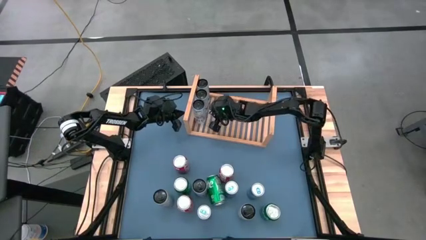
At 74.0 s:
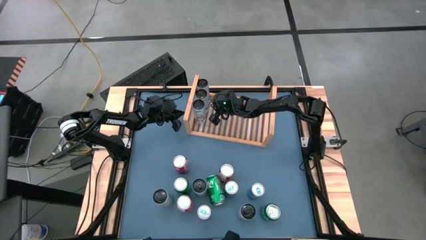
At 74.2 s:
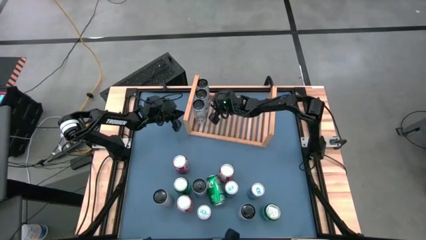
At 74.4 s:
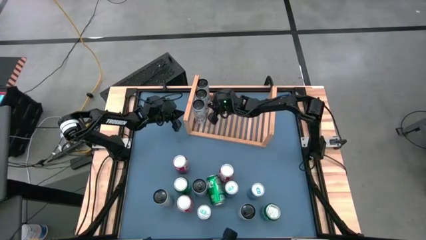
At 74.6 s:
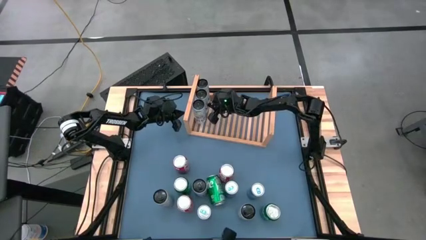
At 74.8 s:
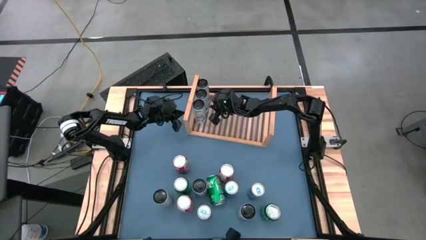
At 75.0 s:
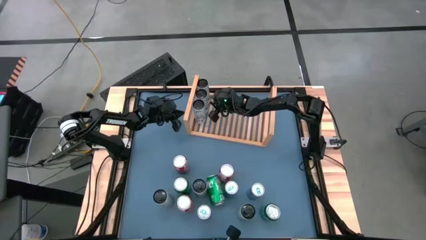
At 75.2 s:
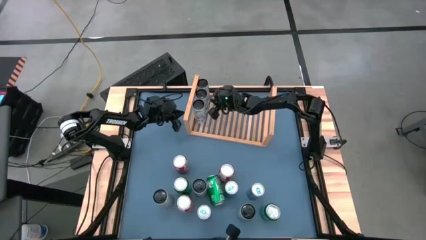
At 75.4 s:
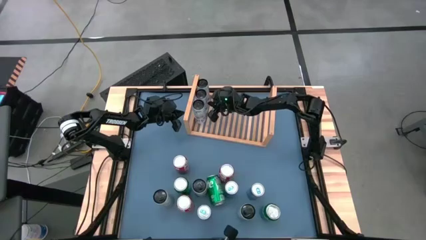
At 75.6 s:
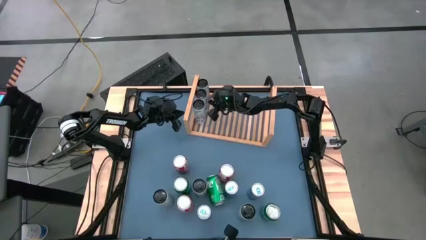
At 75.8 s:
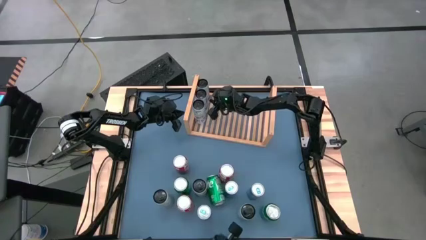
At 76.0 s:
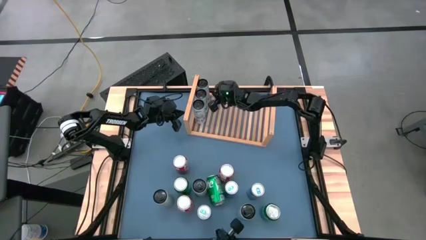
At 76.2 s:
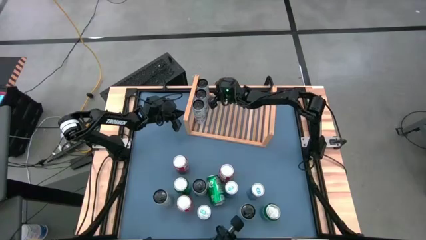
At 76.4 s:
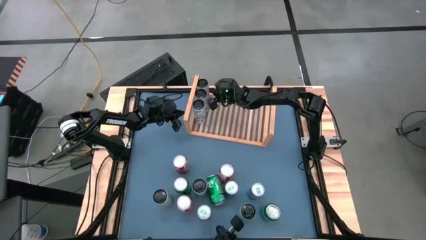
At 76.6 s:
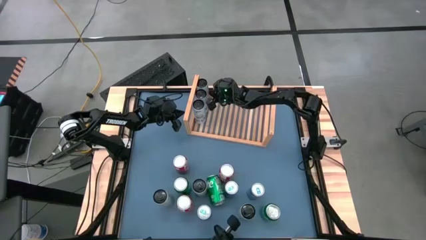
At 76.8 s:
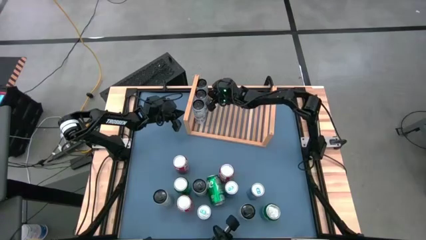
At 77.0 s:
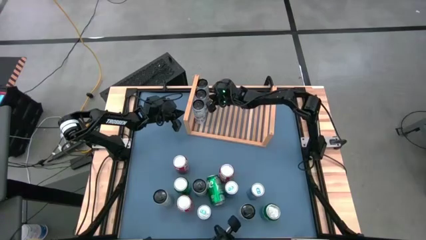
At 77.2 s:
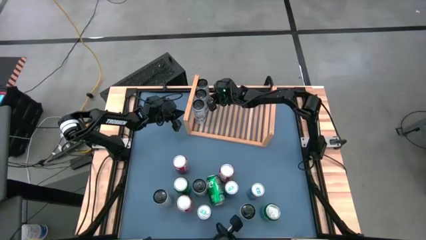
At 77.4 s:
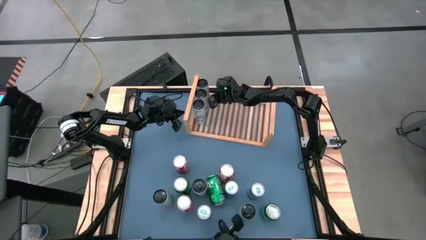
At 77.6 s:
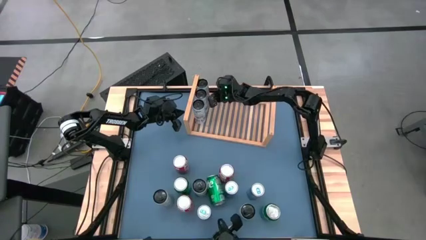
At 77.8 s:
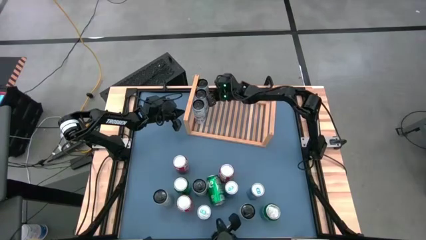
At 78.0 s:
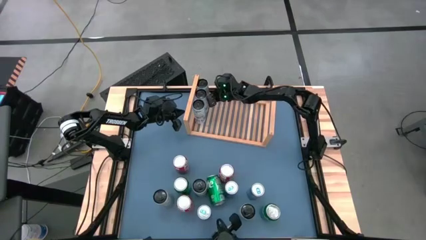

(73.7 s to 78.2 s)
Task: Place canned beverage on shelf
Adjust the white blue soda cans on the shelf

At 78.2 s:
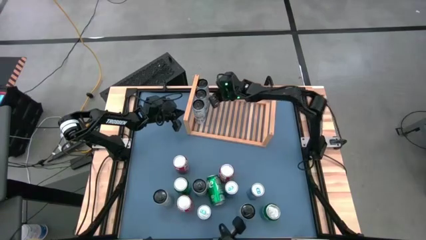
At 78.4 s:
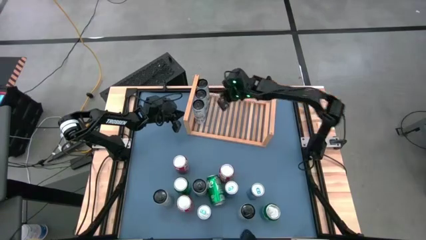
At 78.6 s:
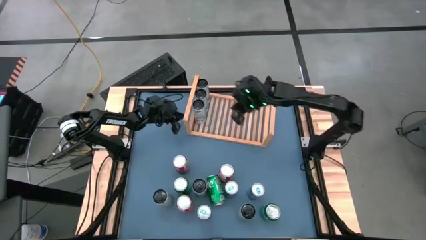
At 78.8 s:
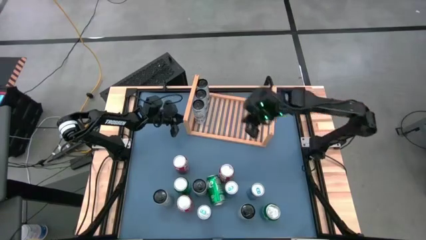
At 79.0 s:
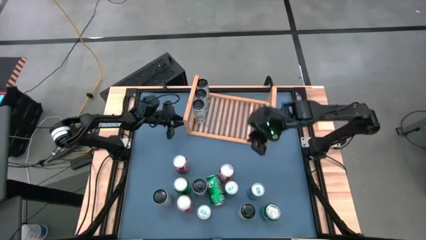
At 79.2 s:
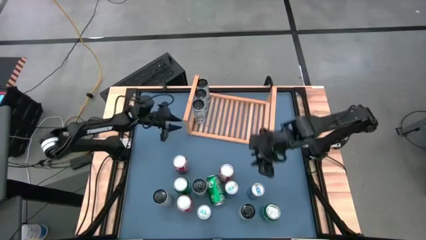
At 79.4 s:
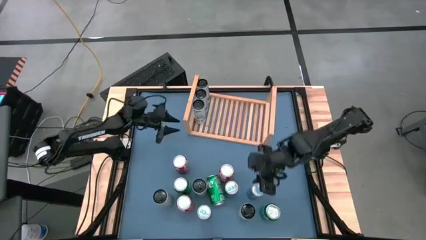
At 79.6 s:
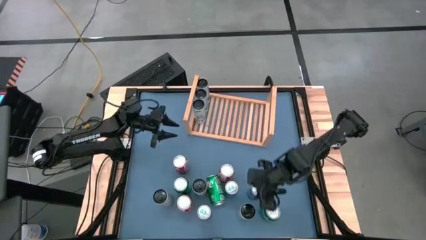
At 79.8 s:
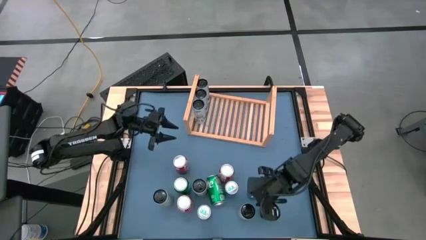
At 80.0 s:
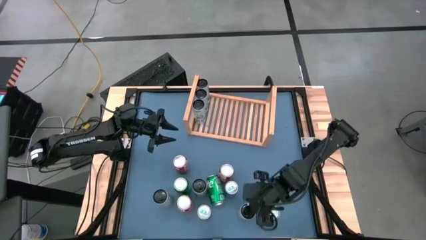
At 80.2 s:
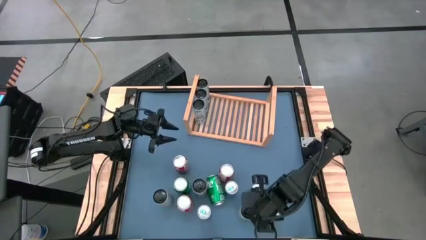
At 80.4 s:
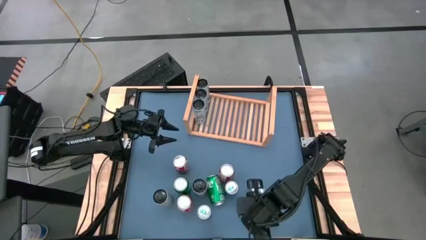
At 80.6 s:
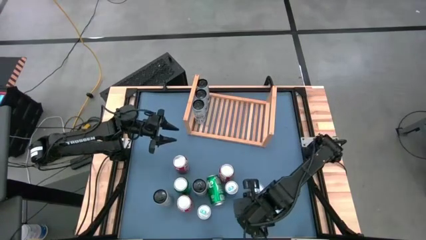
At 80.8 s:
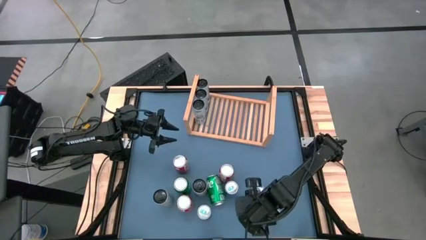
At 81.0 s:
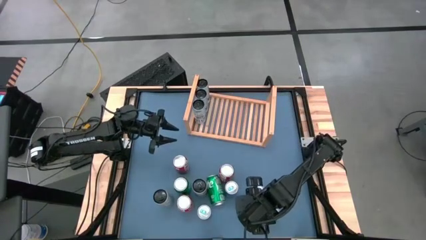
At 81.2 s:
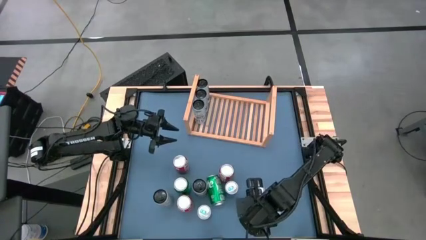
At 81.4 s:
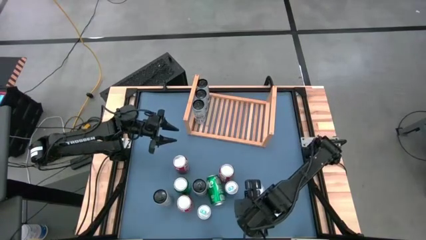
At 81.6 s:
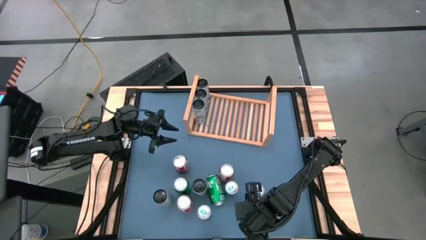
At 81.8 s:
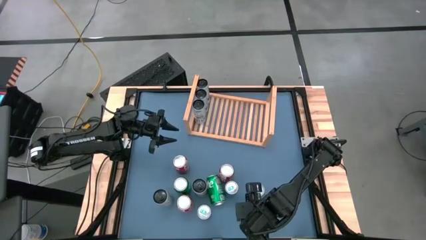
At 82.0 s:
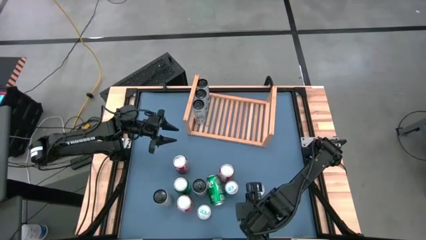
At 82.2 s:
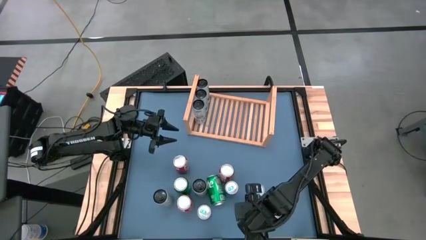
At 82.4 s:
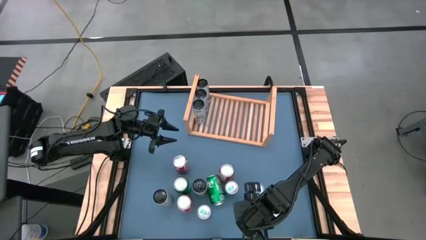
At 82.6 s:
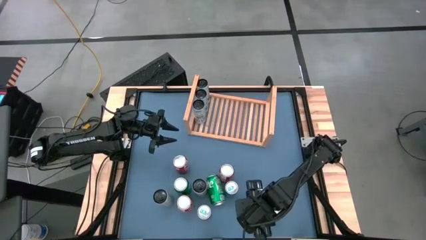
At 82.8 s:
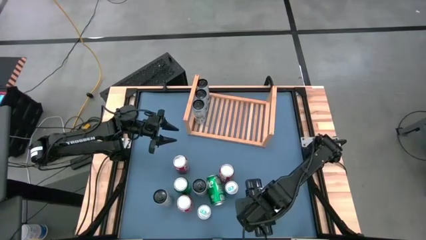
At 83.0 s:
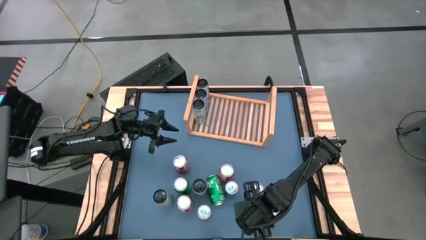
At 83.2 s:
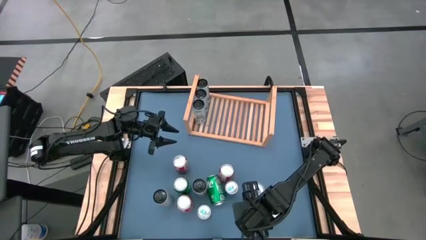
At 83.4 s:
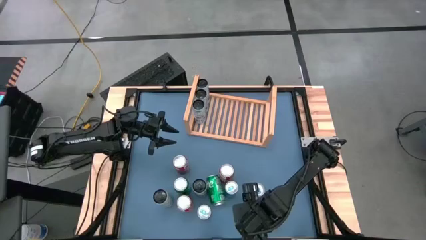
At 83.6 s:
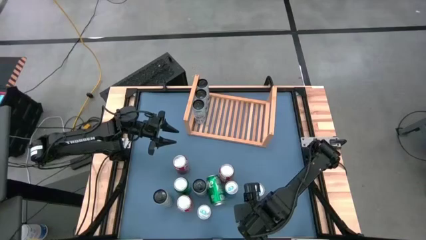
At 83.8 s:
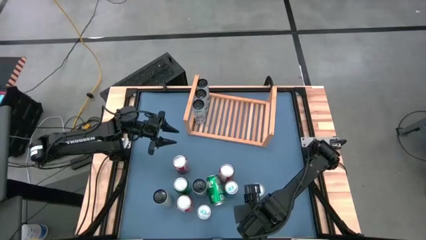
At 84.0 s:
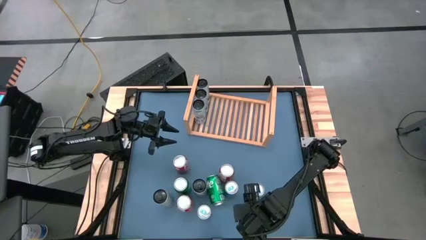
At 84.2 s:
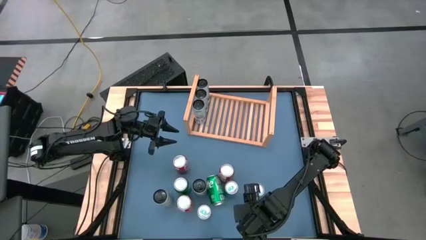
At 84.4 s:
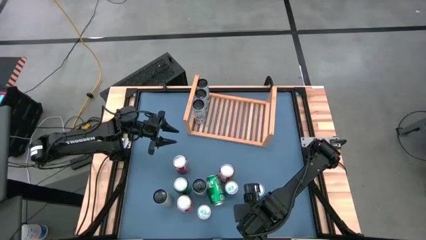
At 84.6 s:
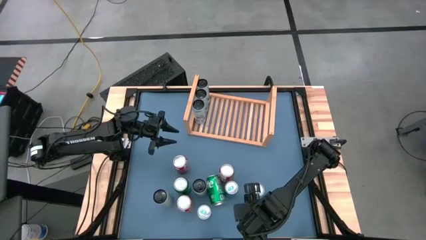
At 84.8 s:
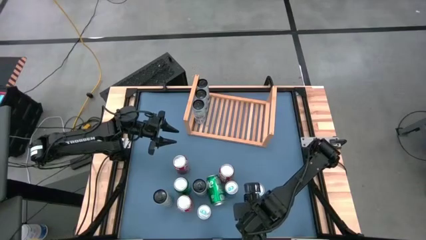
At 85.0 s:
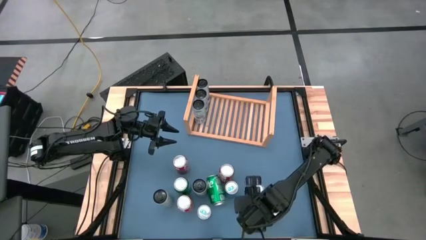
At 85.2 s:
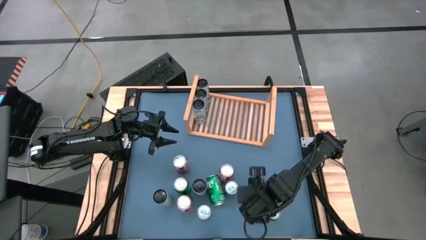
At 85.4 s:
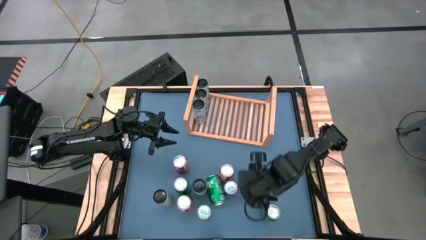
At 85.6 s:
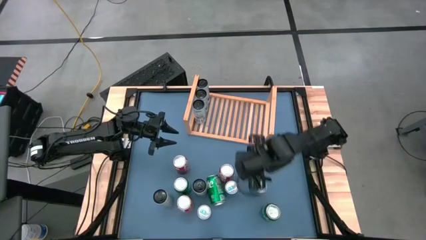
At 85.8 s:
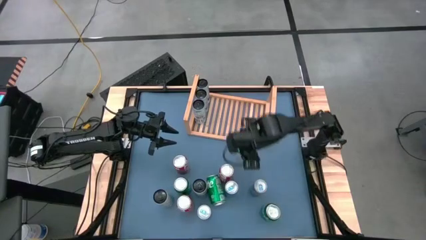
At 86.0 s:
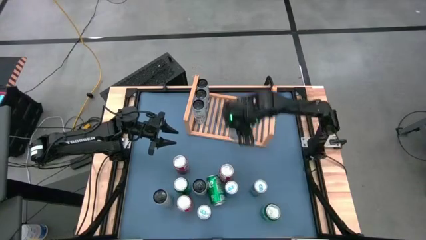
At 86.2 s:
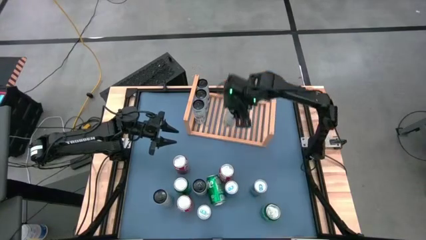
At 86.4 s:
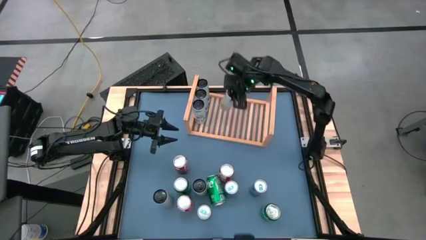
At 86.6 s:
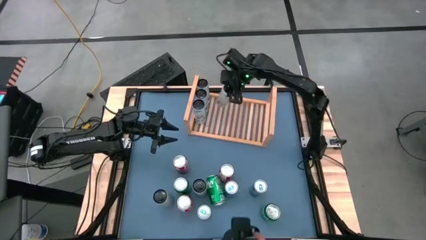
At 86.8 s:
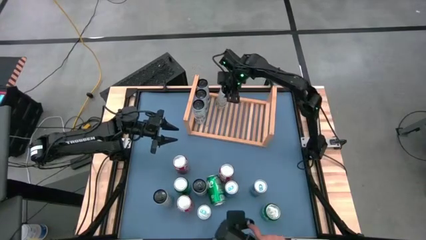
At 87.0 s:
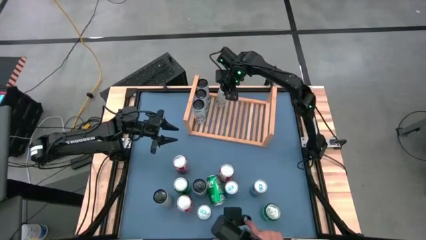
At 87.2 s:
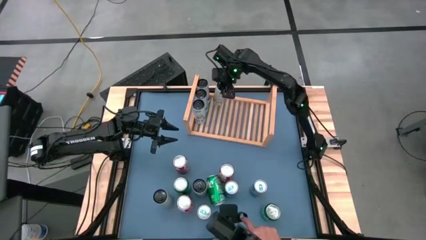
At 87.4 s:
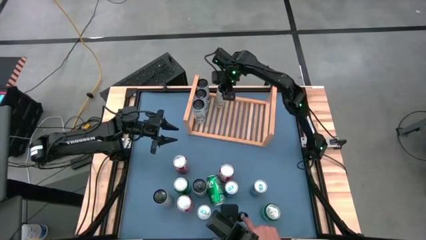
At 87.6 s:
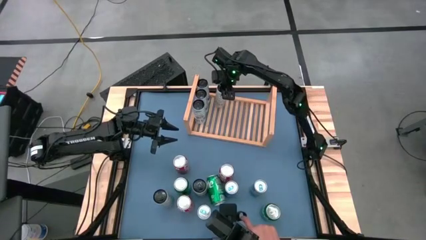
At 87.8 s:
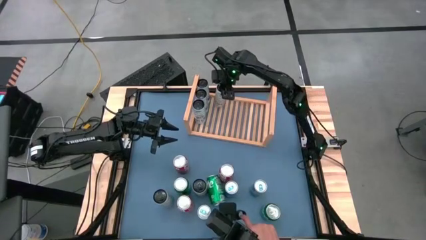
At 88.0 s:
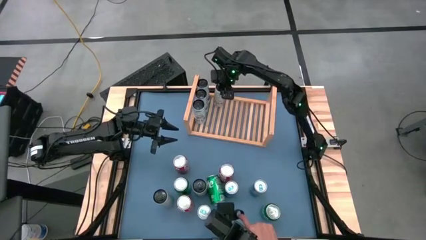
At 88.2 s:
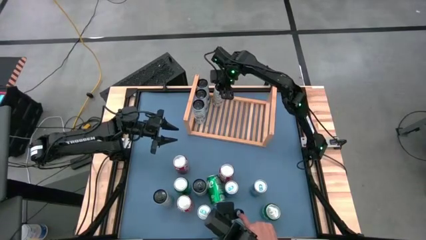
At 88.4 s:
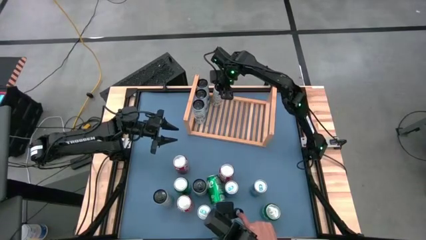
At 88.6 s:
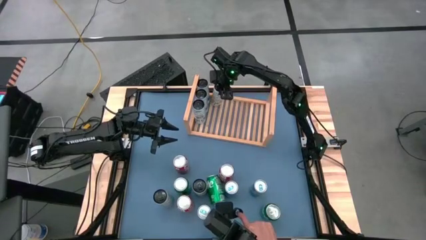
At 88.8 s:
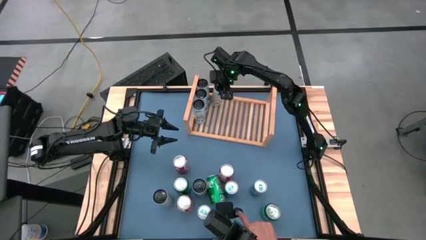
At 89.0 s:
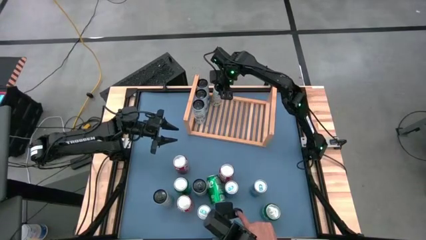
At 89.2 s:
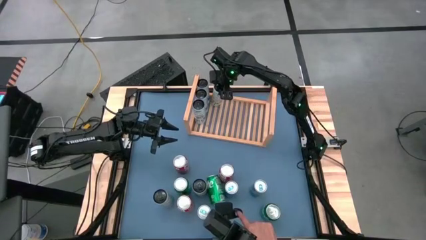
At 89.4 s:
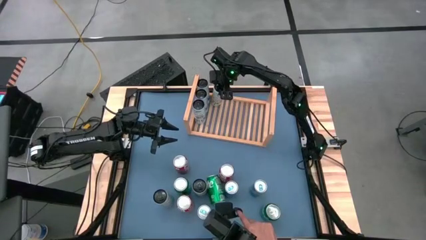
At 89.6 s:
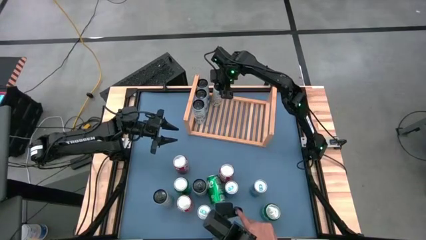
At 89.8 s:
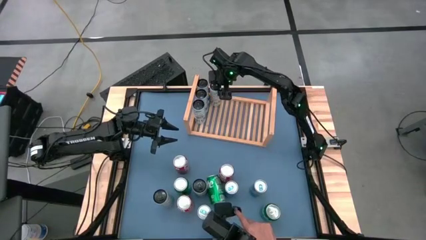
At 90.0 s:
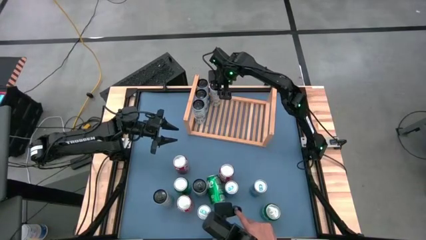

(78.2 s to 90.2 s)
Put the white yellow soda can on the shelf

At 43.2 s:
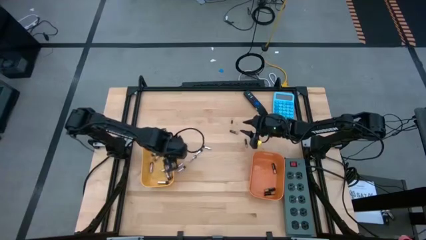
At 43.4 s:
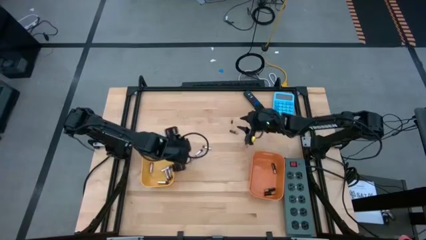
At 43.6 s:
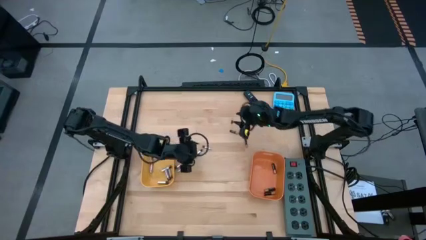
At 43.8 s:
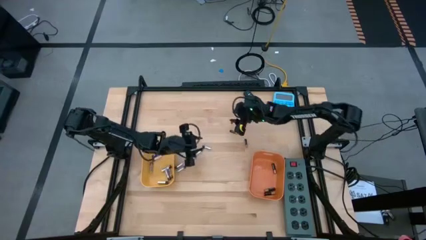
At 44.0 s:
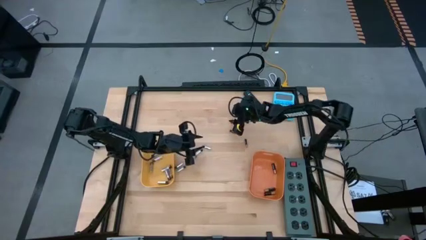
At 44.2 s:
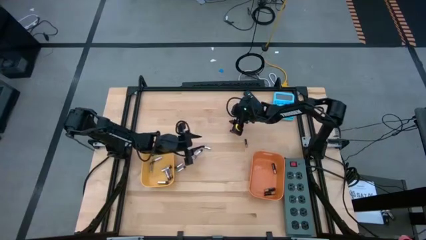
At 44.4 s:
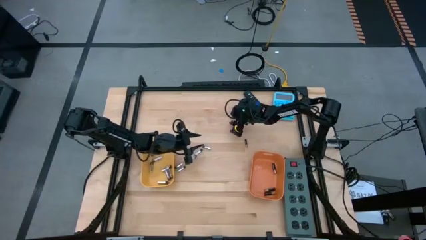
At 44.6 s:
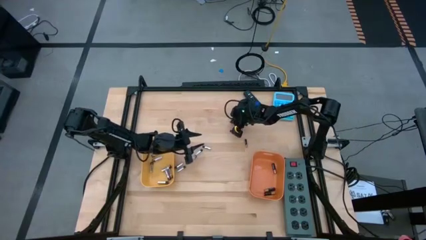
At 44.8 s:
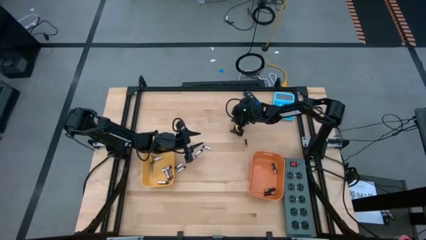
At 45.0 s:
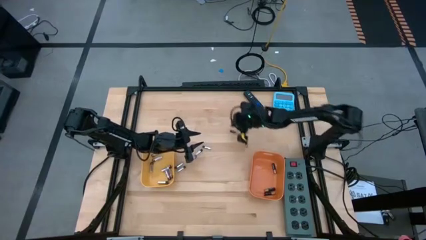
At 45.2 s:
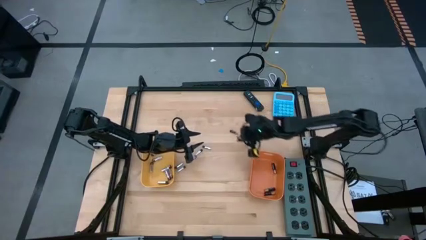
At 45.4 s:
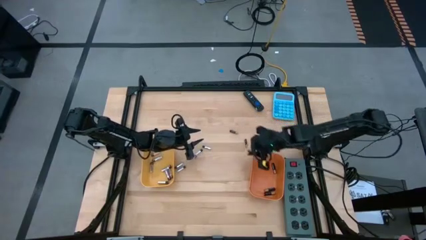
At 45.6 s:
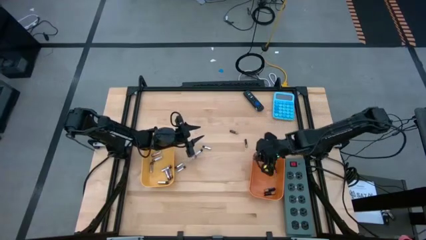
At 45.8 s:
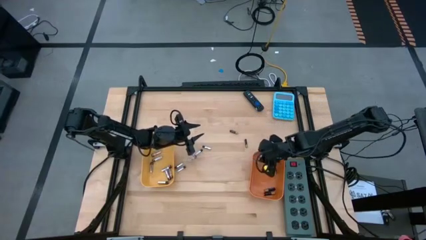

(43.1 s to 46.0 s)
Task: Sort batteries
Put the black battery into the orange bin
